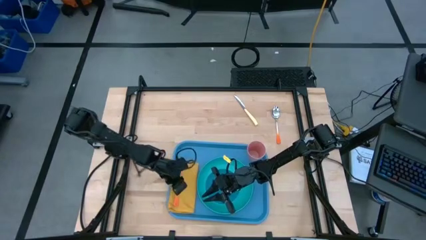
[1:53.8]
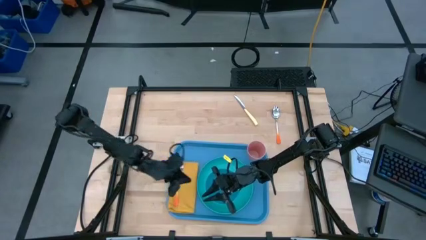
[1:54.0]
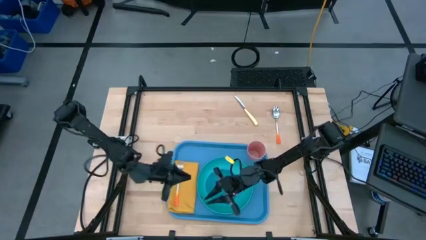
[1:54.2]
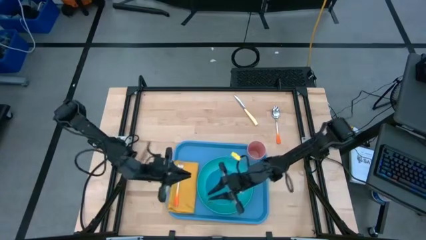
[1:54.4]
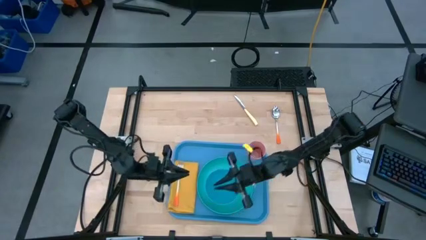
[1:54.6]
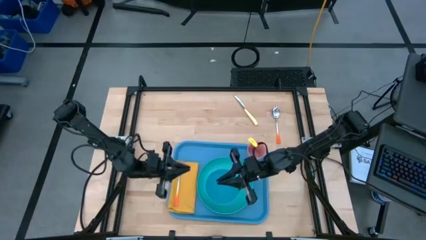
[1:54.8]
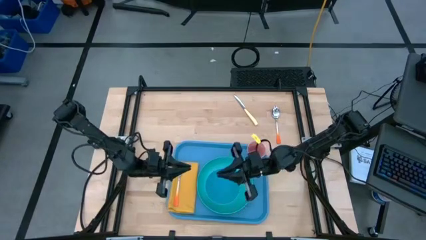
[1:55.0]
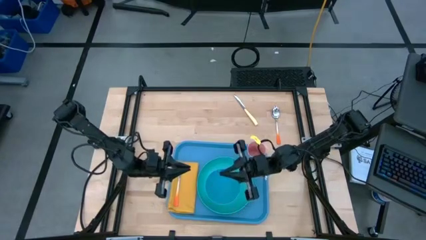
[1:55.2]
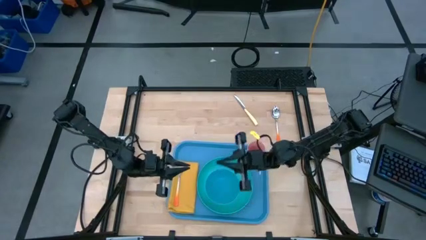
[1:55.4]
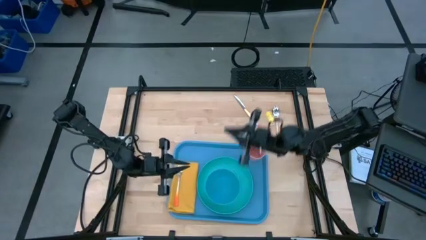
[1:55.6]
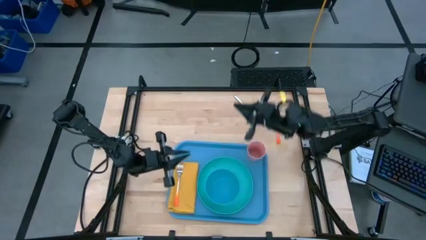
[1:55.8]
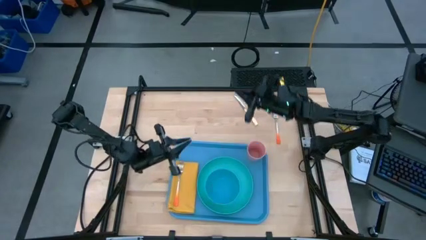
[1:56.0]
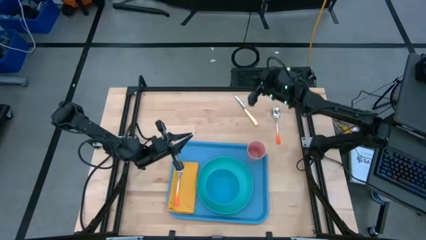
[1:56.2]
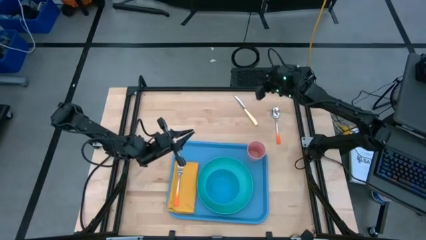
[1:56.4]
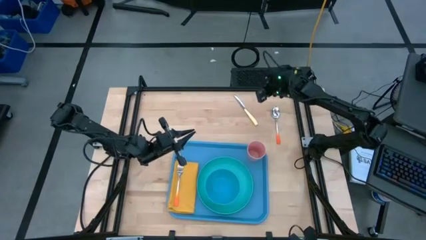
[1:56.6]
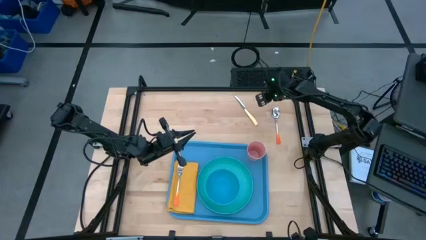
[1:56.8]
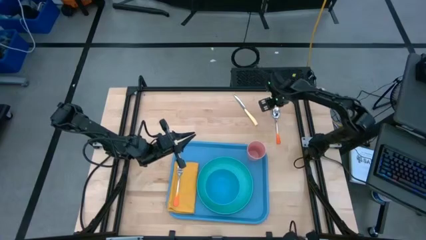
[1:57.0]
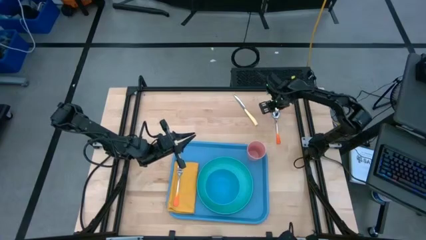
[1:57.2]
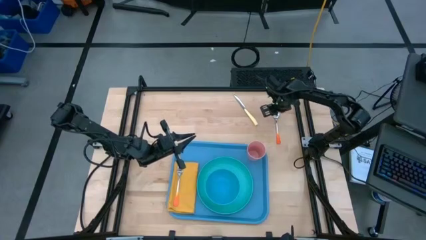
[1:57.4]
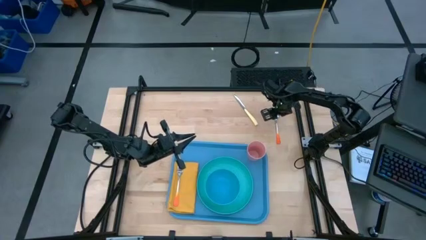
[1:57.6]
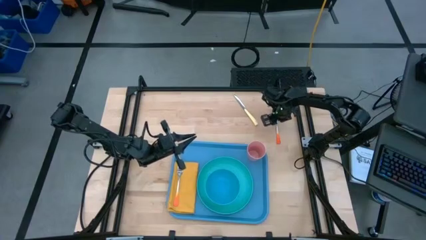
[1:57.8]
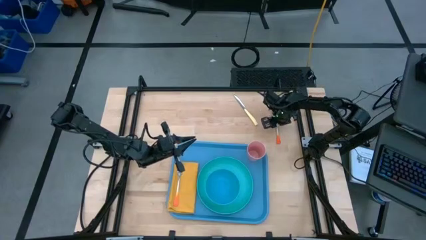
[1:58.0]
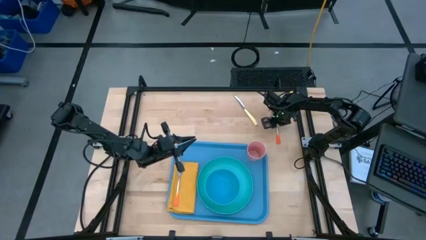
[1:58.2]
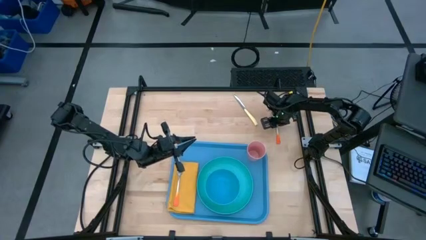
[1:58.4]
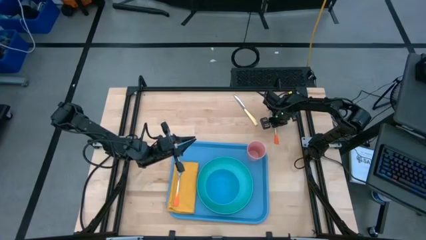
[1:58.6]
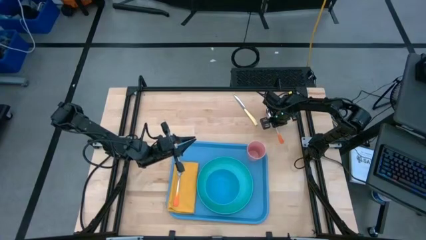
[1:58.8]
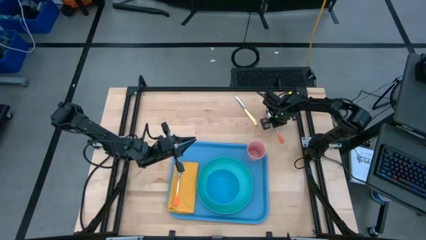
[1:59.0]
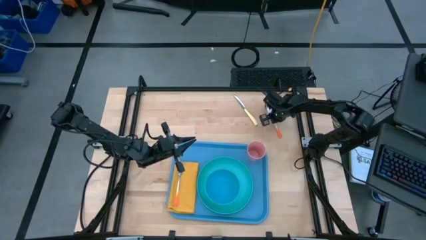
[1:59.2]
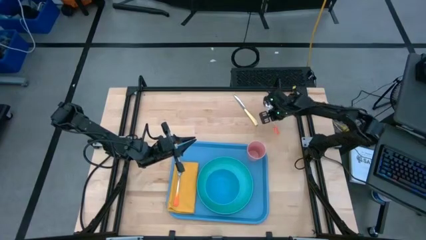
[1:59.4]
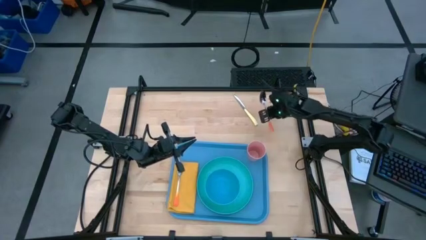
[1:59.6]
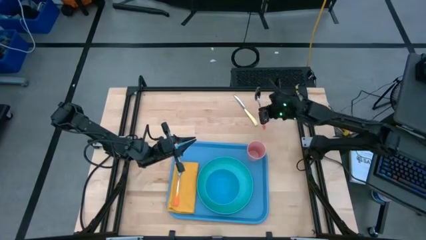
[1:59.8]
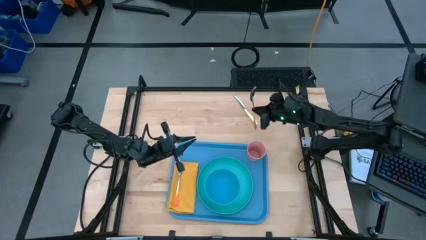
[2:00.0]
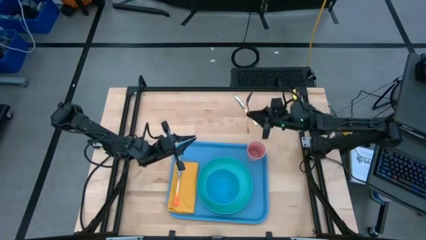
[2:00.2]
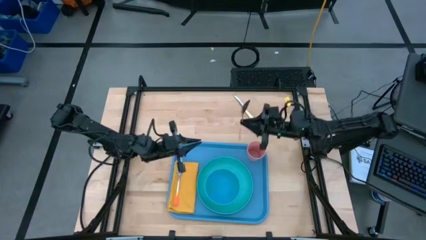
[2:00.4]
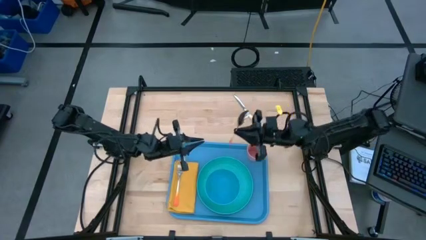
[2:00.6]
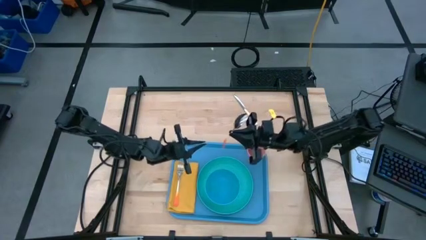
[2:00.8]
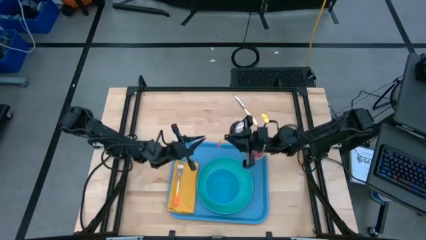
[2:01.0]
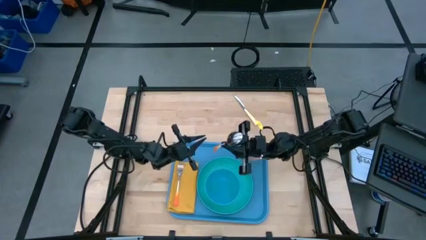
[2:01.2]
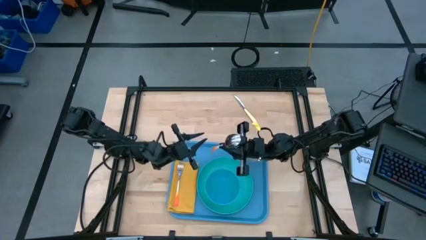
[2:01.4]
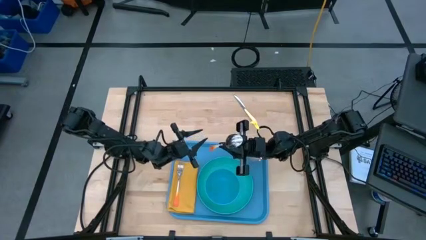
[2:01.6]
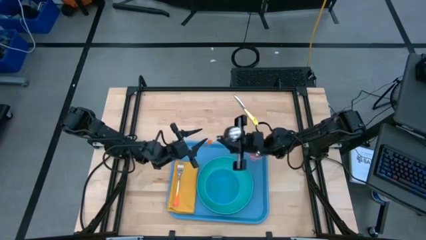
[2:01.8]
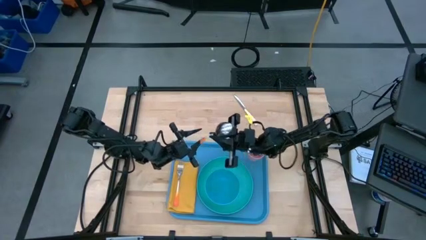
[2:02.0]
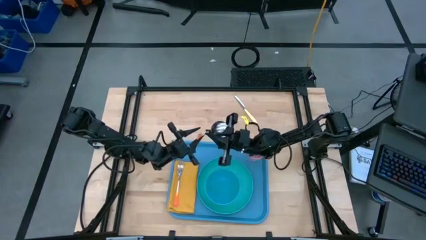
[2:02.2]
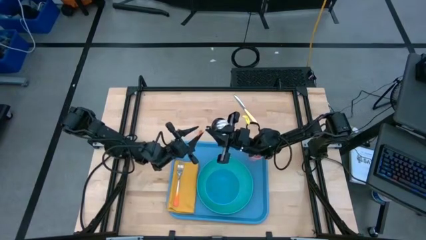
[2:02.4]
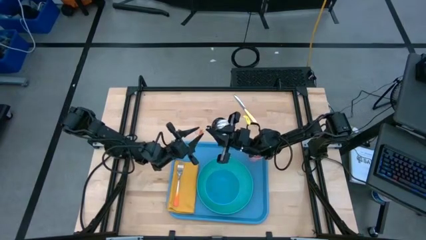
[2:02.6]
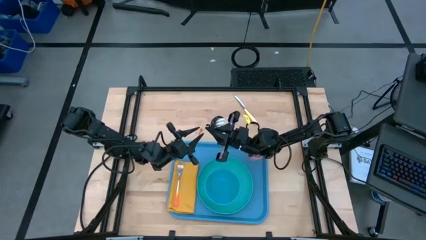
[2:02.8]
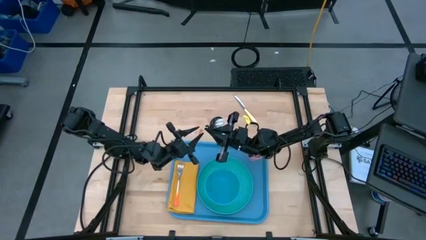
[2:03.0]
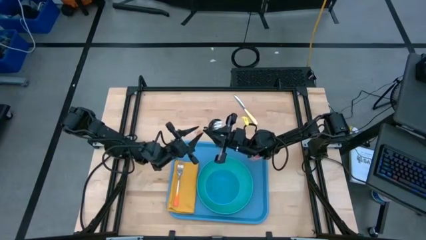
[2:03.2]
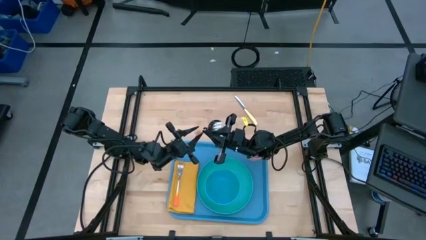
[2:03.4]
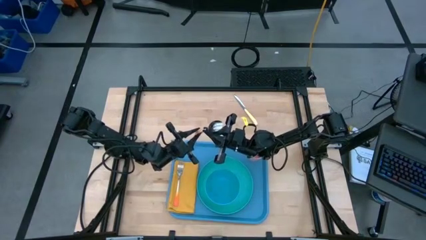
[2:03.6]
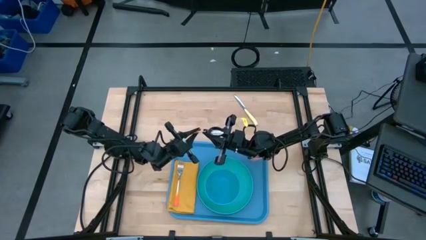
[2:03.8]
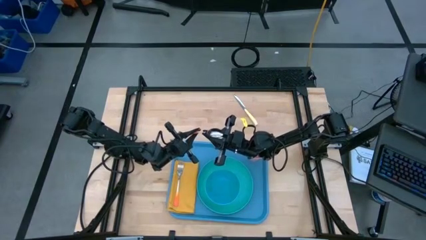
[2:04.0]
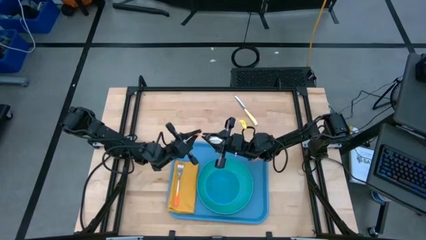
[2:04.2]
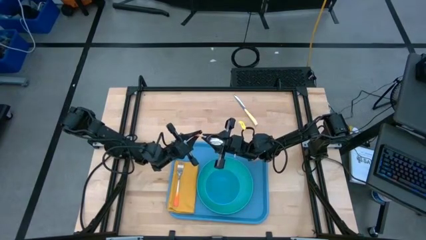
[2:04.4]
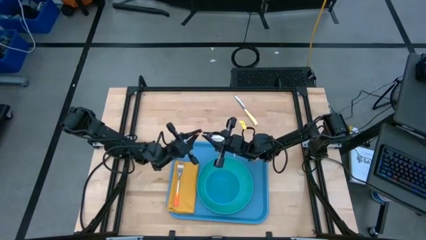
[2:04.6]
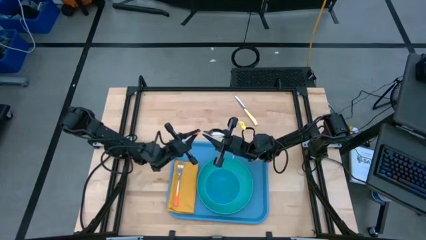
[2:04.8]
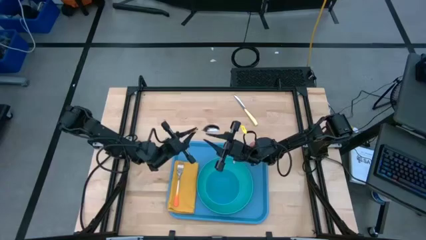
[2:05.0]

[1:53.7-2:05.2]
Task: Set up tray
Put the orange spoon on the blue tray to the right of the orange fork
